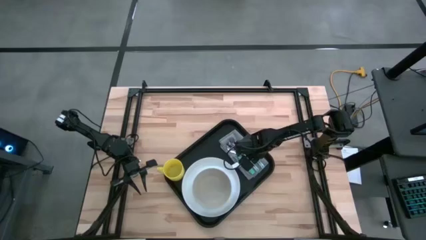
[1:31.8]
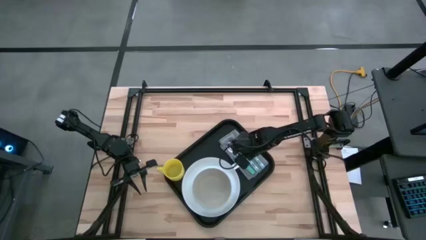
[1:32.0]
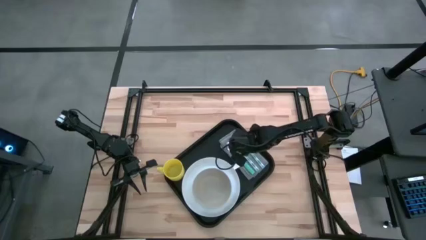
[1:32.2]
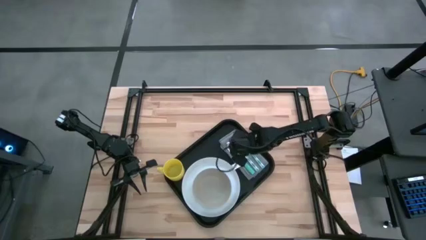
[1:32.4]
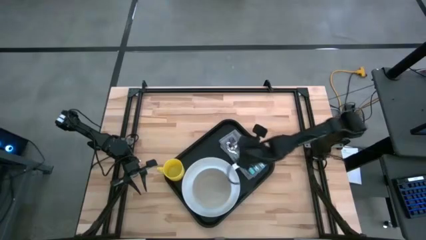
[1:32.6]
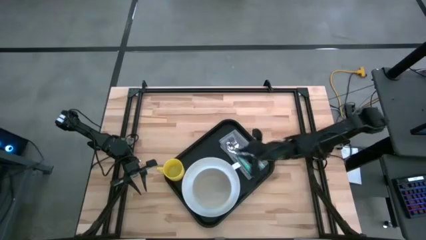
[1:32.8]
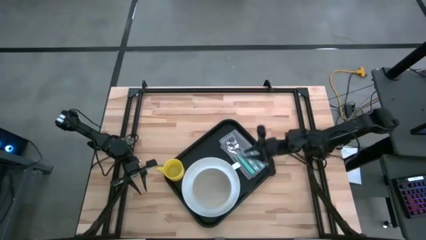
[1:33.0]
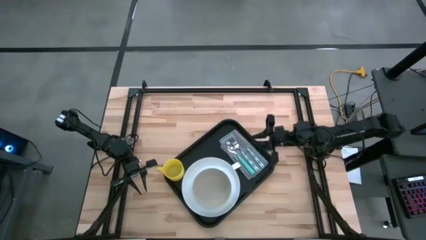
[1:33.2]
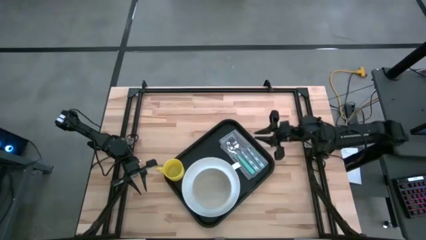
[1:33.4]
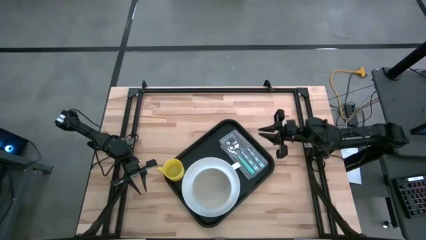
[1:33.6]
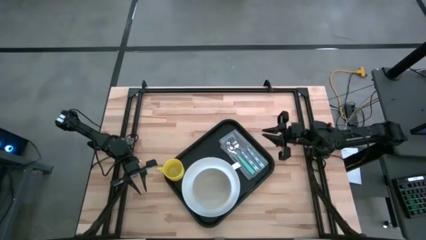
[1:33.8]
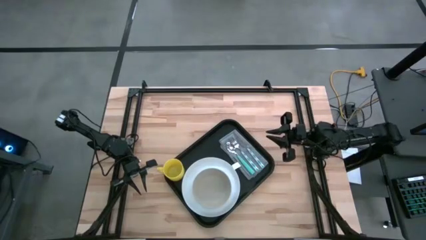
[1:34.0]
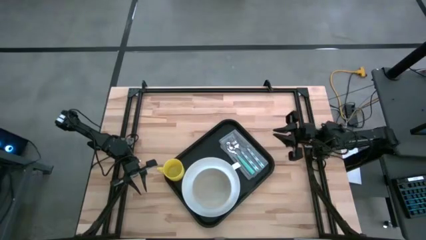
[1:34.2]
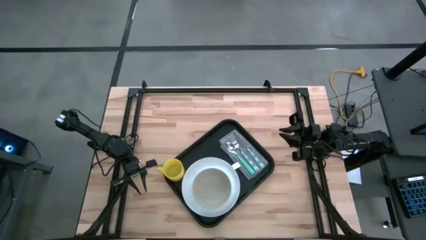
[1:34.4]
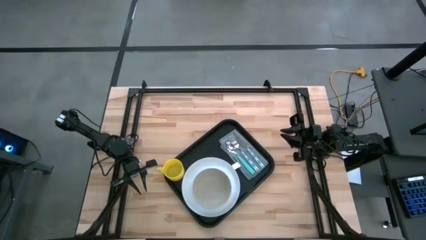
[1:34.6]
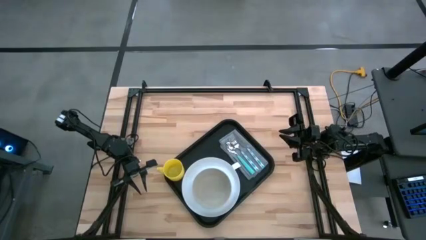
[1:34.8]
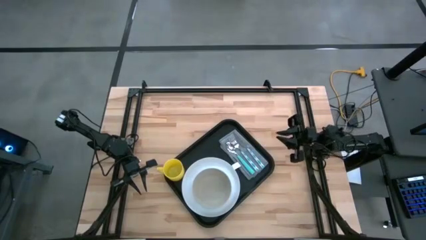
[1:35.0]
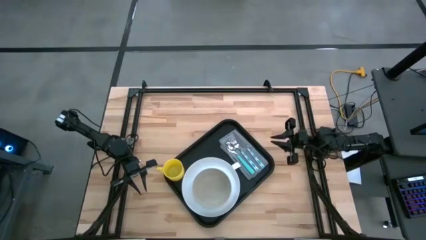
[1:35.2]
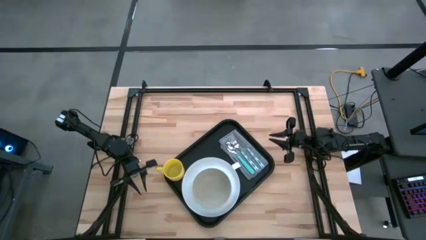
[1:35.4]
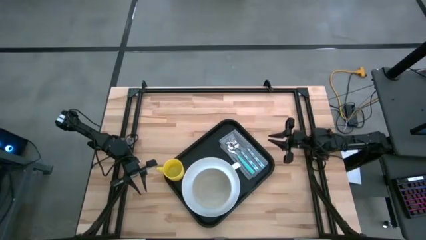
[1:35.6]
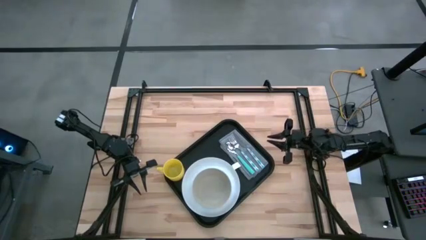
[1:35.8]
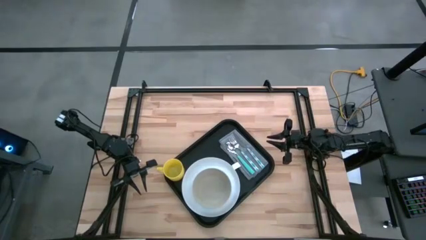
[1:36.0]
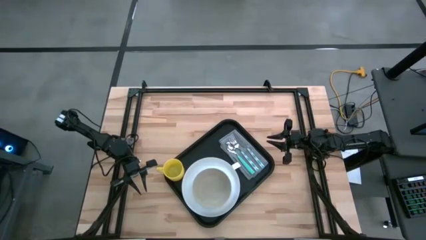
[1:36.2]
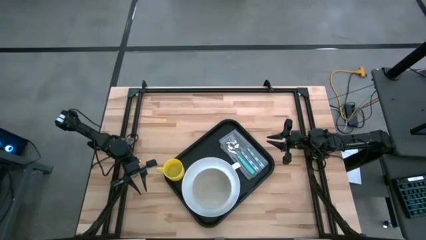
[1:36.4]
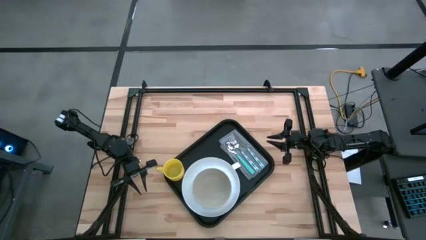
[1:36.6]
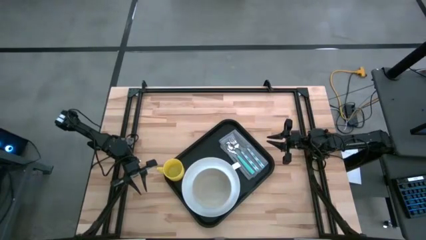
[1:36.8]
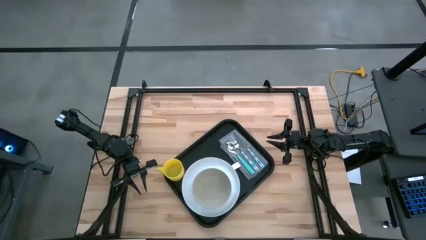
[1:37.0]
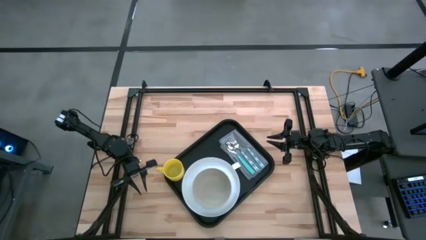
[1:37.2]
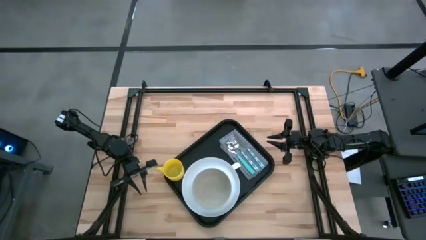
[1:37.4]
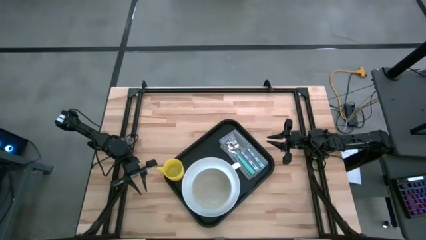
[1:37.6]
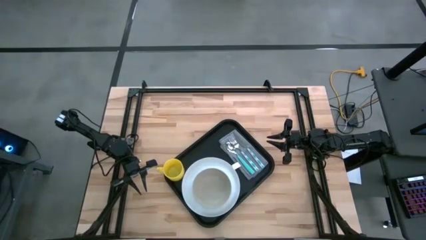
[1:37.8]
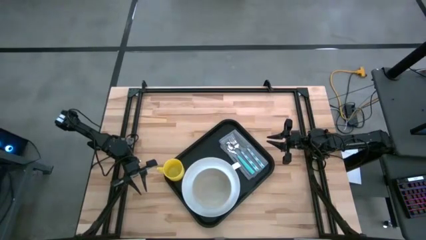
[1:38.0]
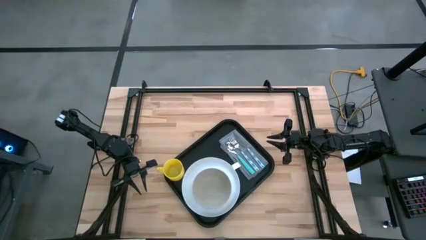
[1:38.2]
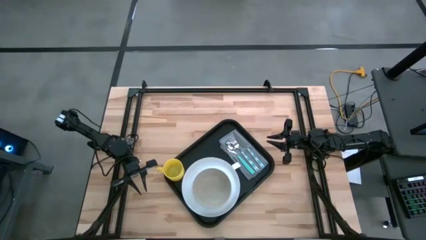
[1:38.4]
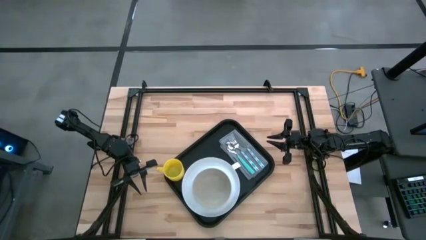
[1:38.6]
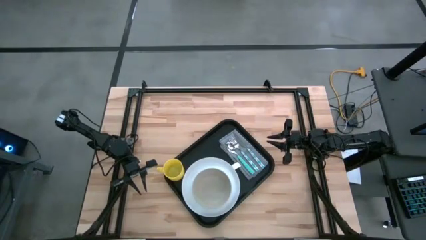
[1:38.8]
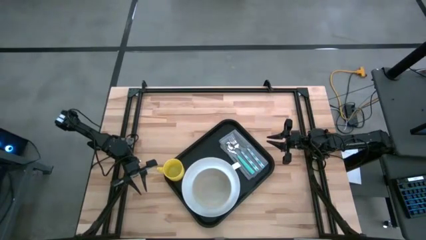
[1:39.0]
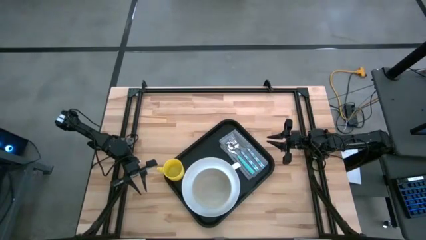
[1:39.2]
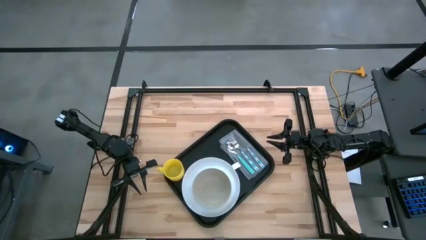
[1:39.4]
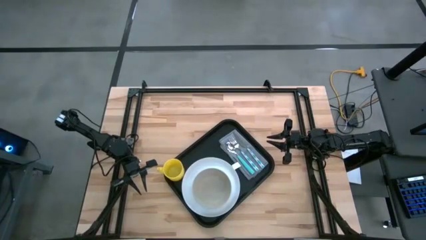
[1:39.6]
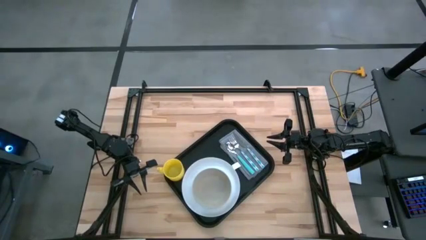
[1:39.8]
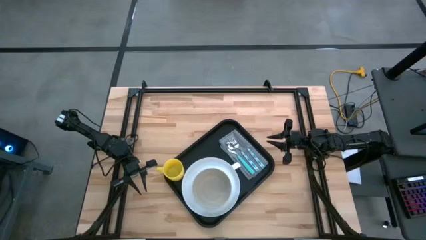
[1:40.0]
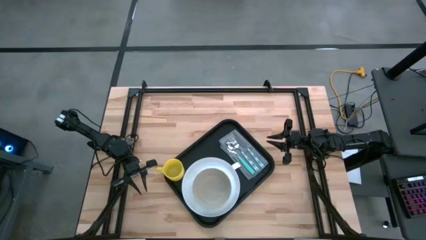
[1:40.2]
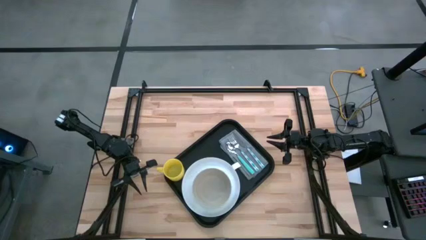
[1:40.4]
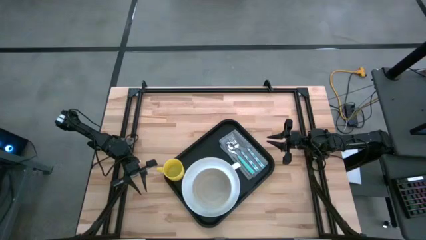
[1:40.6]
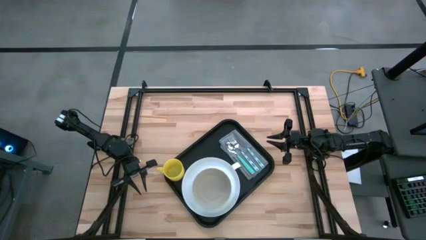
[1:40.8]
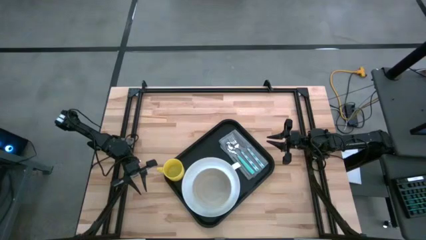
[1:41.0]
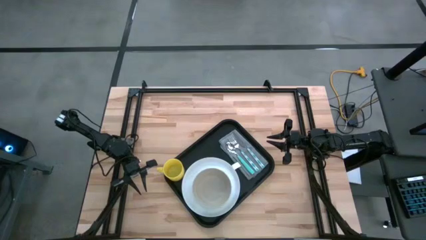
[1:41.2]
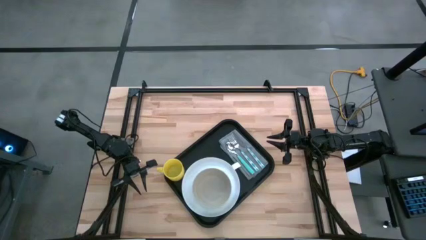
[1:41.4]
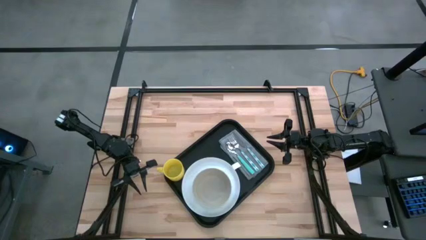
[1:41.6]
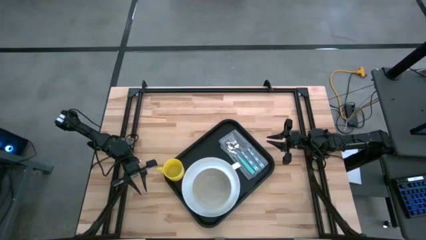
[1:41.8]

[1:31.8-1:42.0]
Task: Set up tray
Return to Home Position

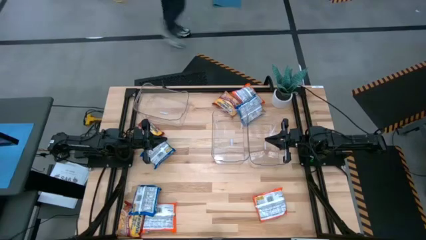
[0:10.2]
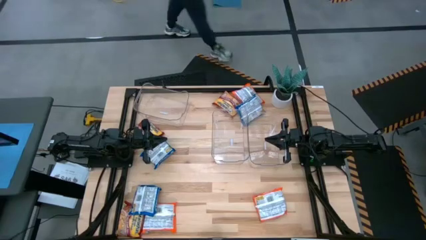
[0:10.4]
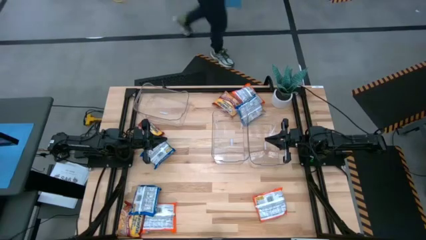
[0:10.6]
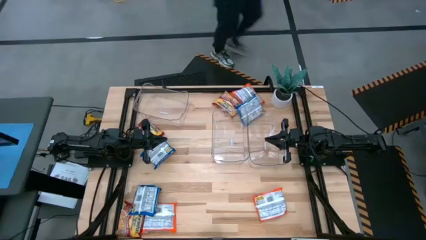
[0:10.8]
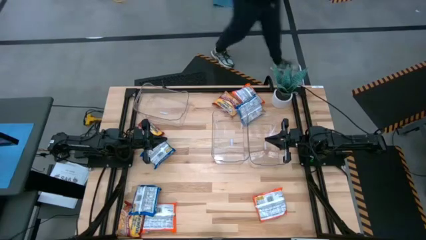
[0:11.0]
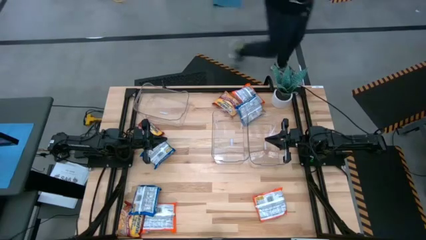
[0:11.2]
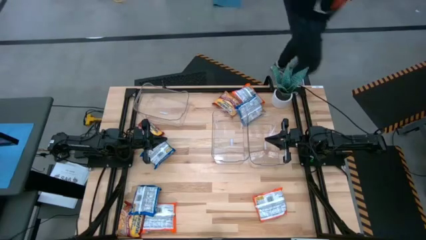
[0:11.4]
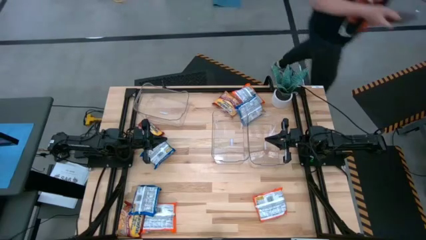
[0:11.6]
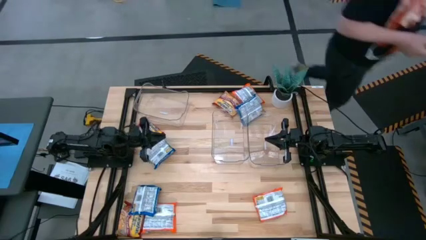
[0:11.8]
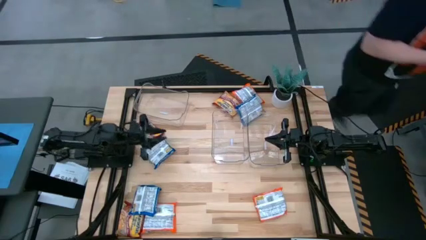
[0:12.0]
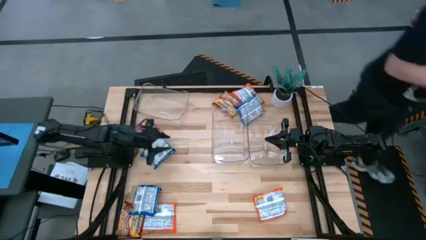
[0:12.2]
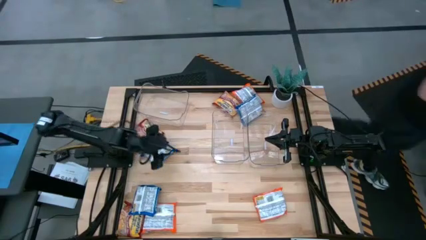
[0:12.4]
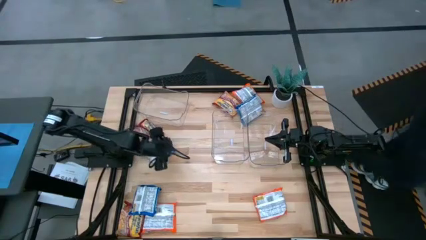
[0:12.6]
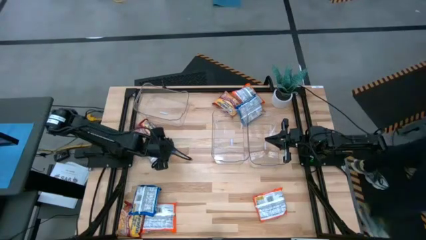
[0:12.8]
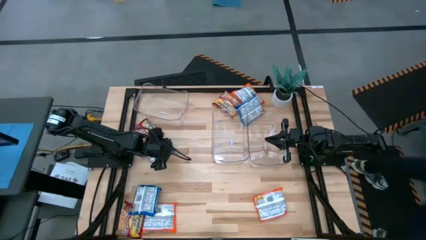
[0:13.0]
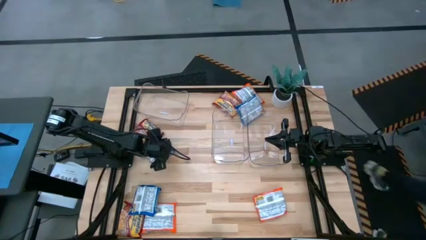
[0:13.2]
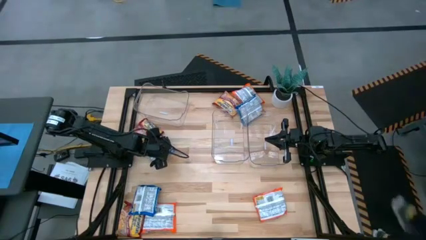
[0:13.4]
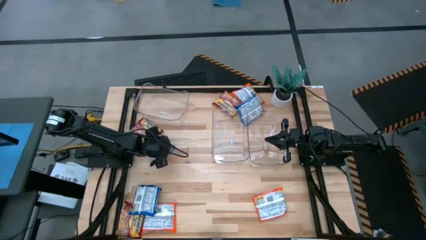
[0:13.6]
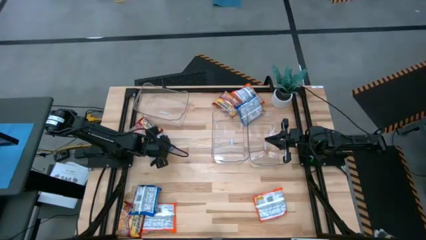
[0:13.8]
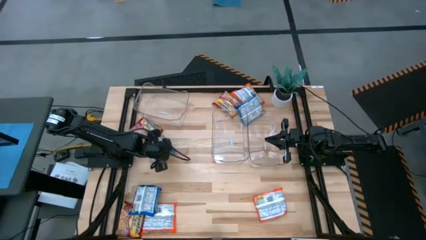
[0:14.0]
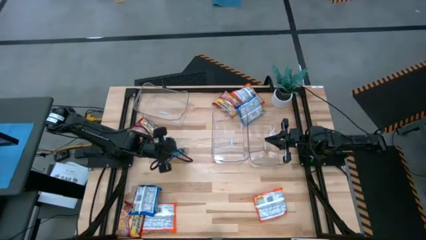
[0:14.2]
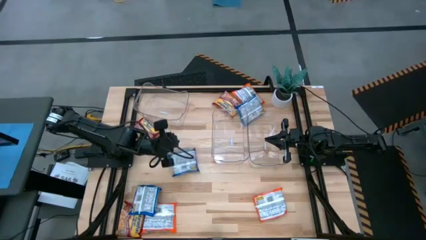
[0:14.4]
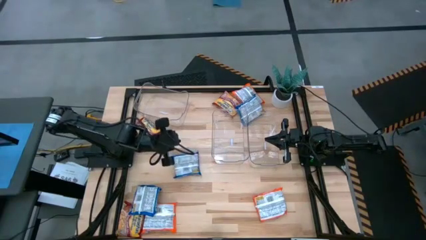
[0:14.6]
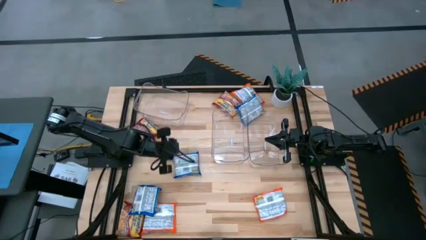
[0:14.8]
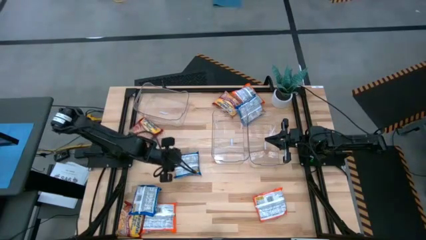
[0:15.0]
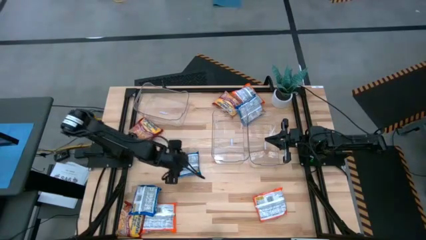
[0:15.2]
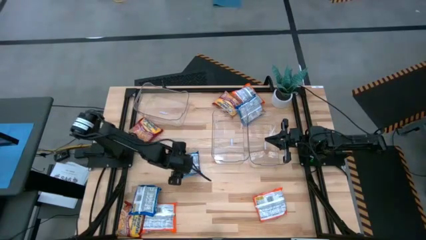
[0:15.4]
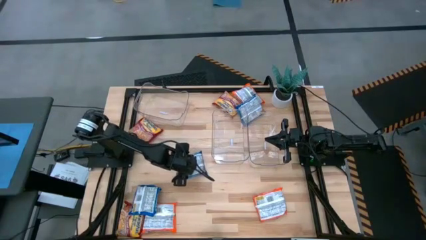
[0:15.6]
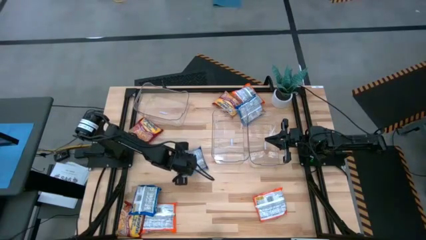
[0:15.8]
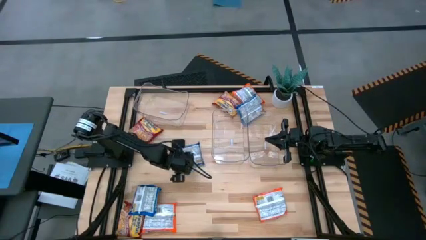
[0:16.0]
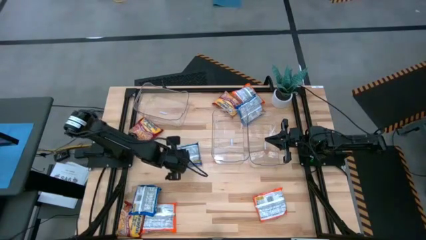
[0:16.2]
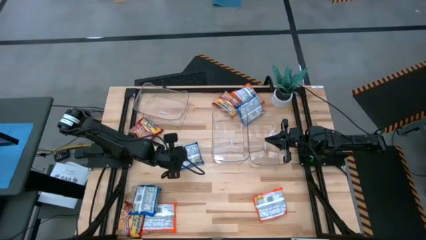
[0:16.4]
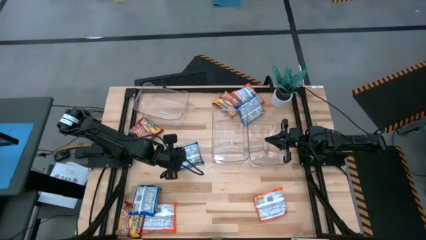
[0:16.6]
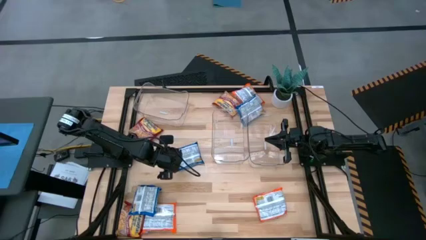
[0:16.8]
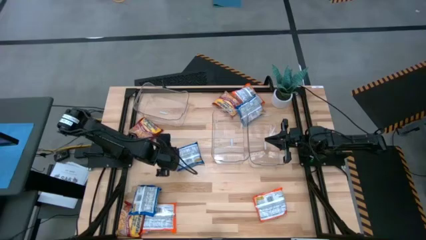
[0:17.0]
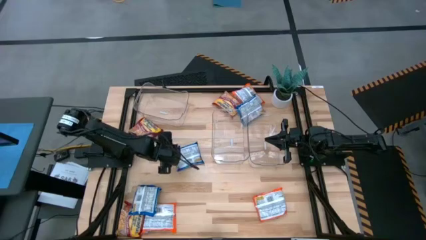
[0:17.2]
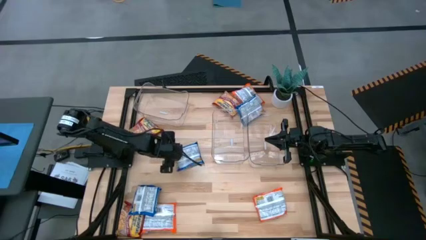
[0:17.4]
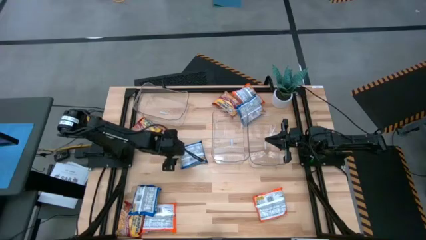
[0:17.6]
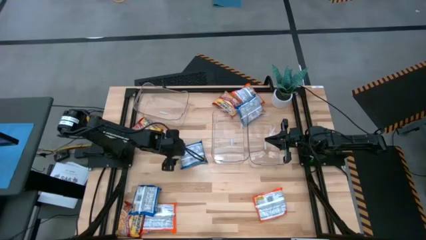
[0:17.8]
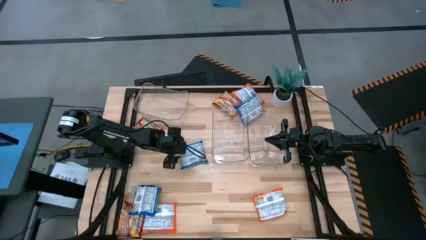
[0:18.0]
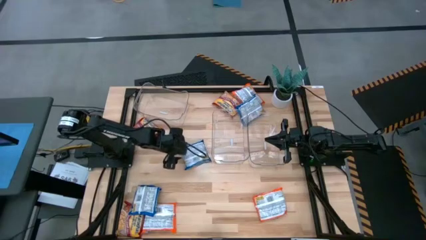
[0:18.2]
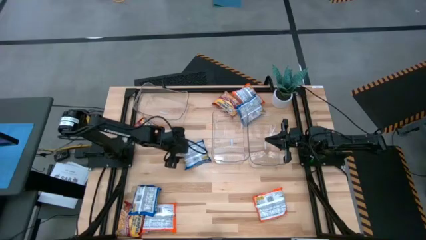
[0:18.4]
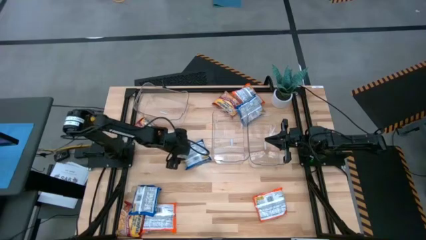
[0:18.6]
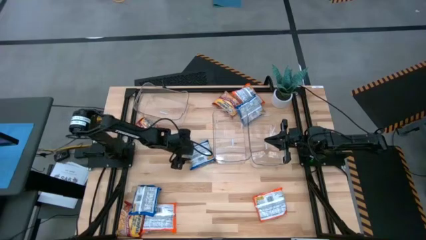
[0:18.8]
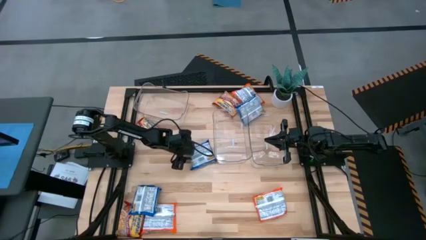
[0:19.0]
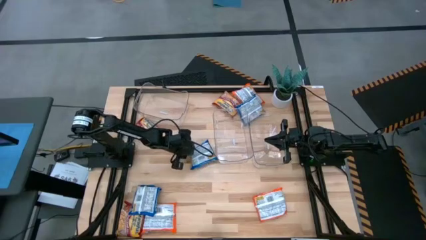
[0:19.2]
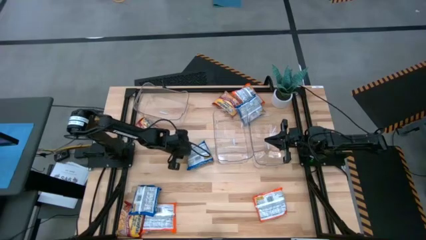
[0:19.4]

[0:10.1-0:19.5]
Task: Sort Maruchan noodles
Put the middle left blue noodle pack into the top left transparent bin
